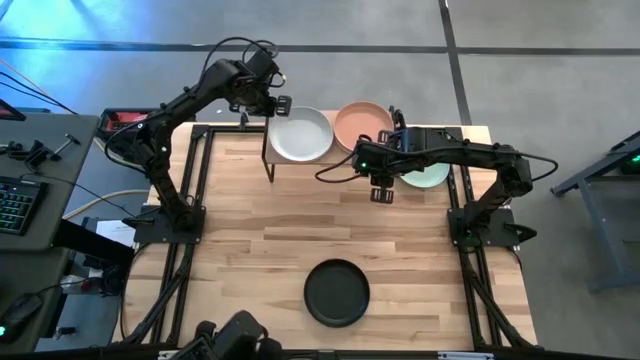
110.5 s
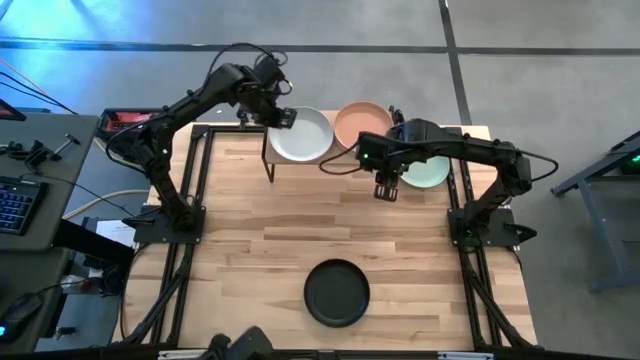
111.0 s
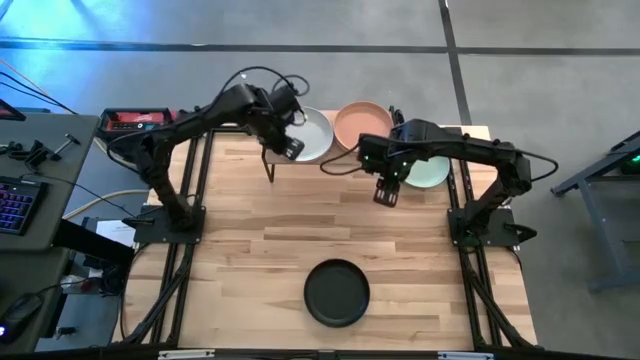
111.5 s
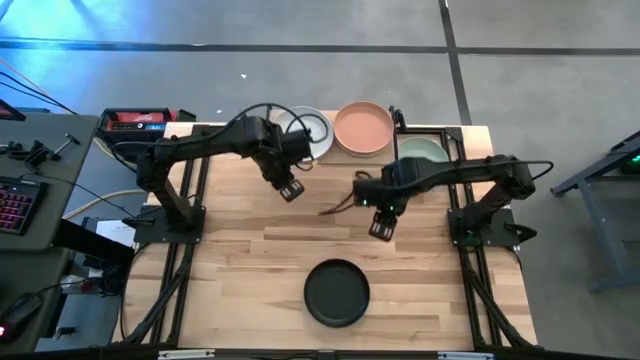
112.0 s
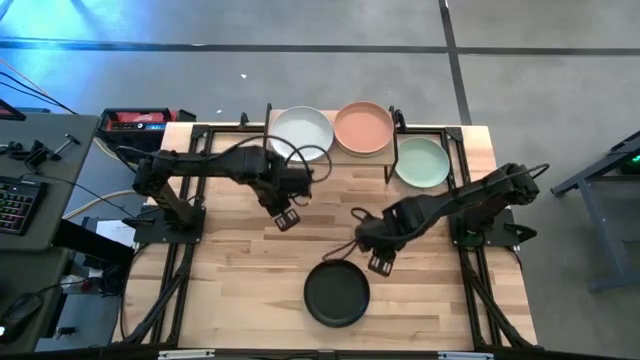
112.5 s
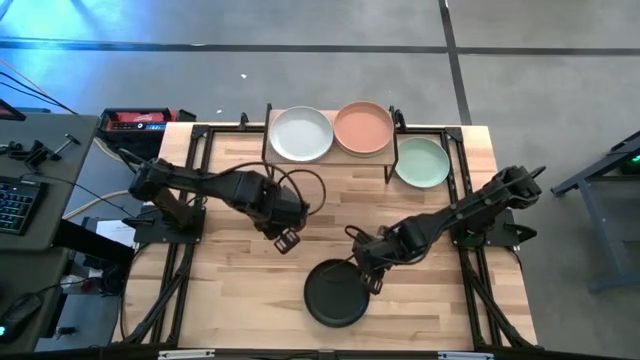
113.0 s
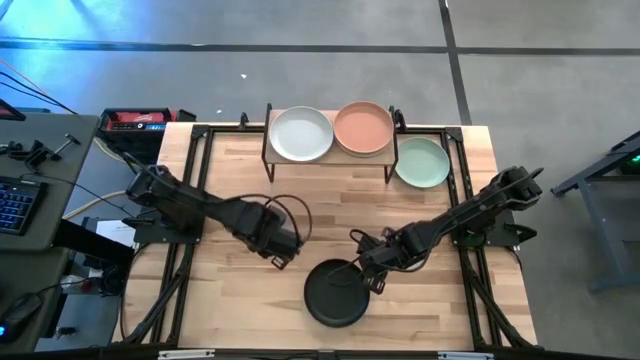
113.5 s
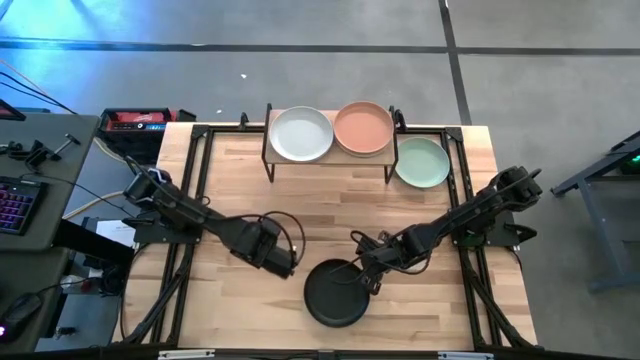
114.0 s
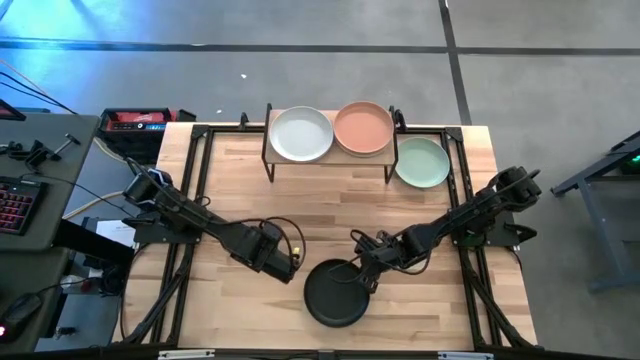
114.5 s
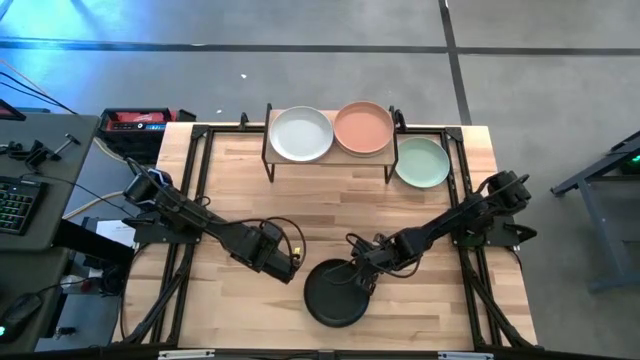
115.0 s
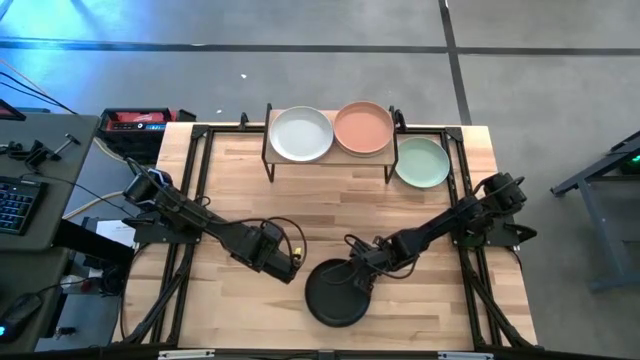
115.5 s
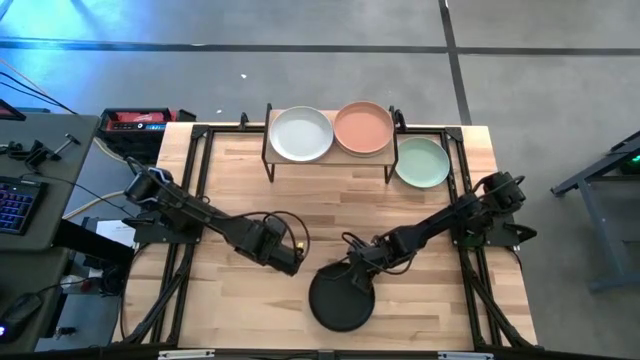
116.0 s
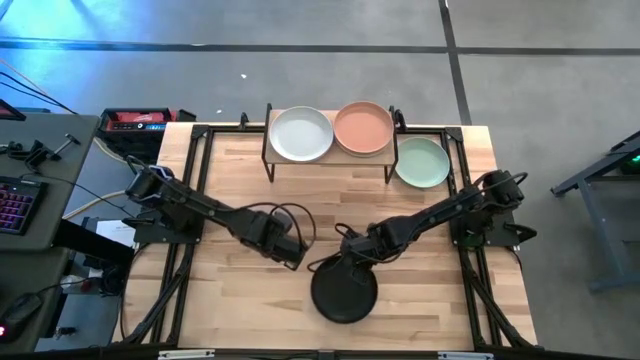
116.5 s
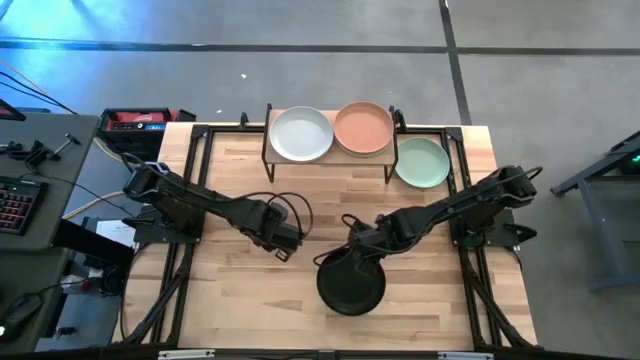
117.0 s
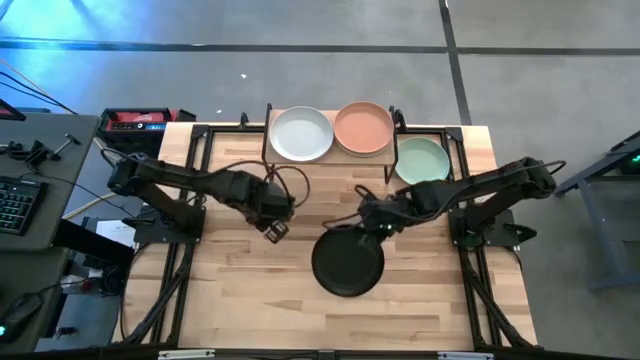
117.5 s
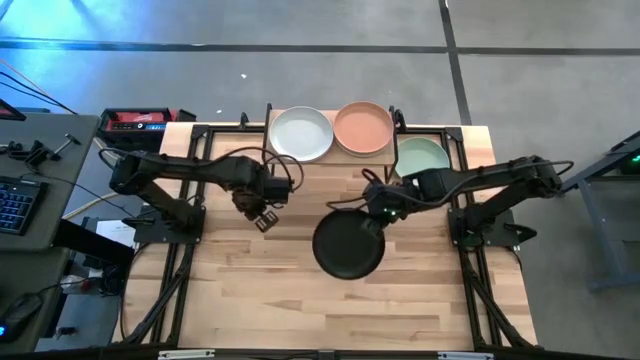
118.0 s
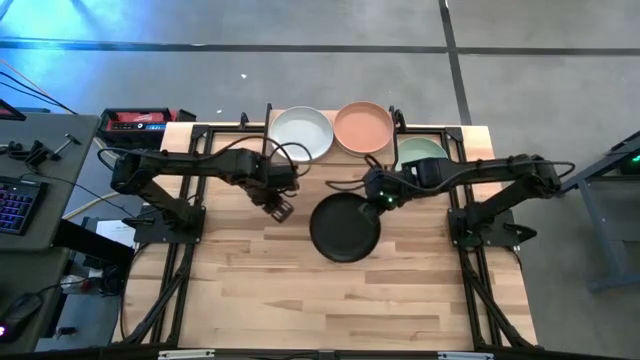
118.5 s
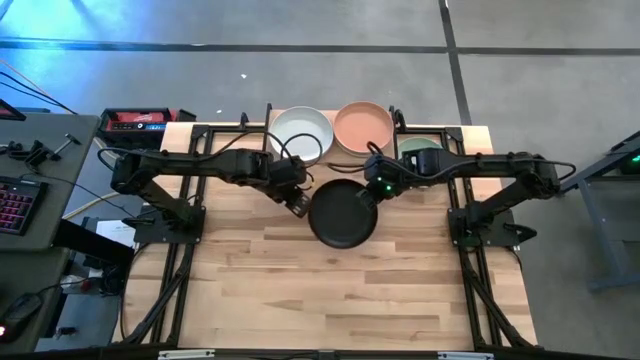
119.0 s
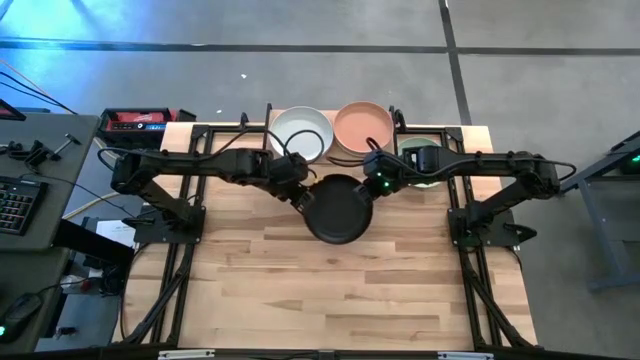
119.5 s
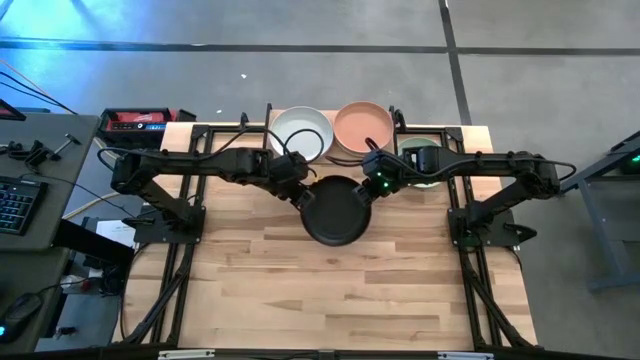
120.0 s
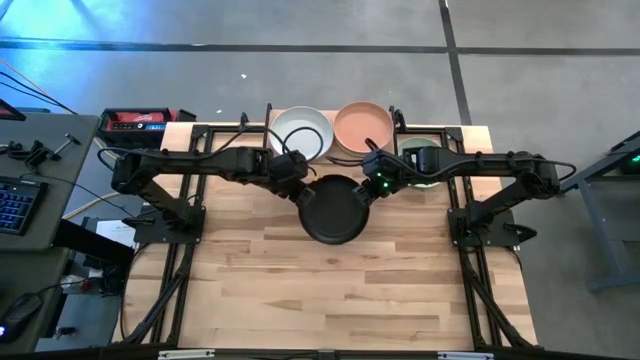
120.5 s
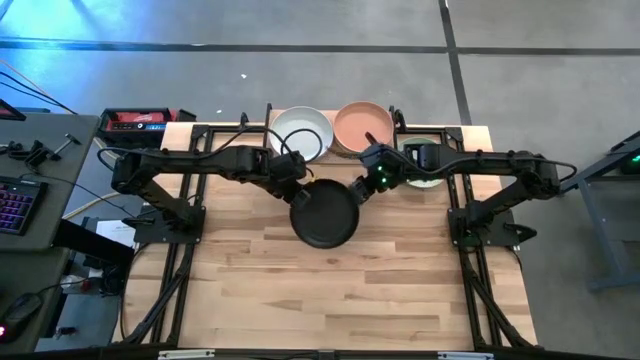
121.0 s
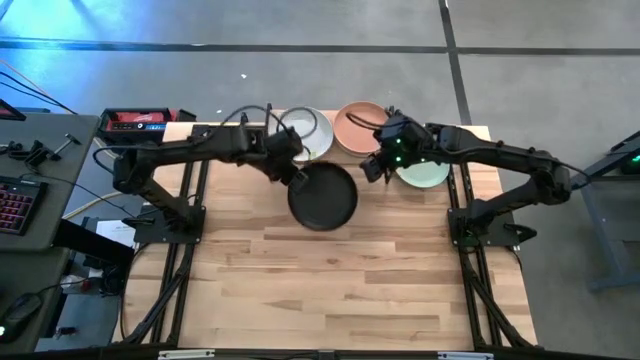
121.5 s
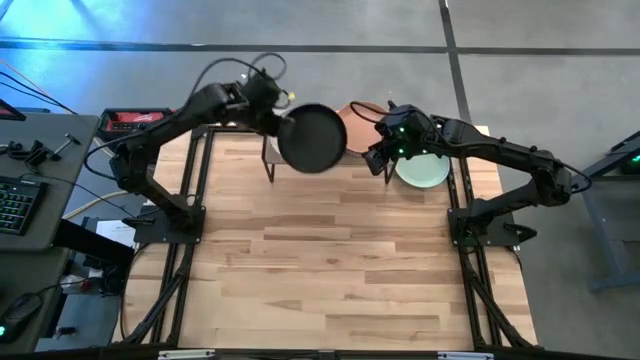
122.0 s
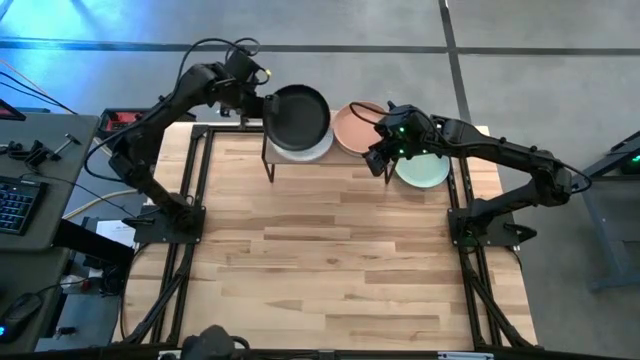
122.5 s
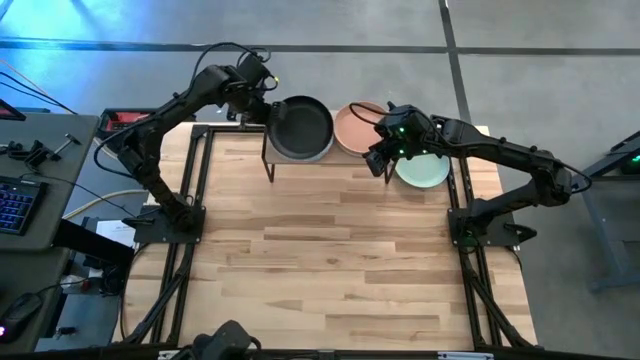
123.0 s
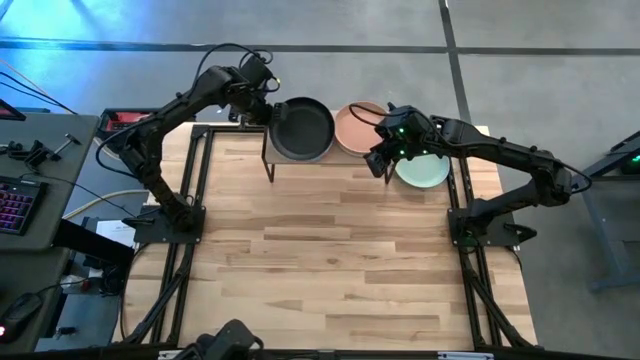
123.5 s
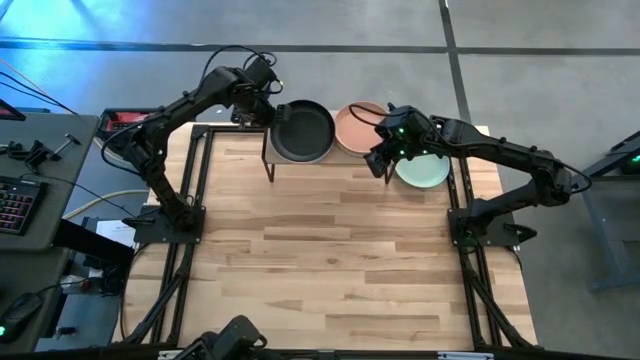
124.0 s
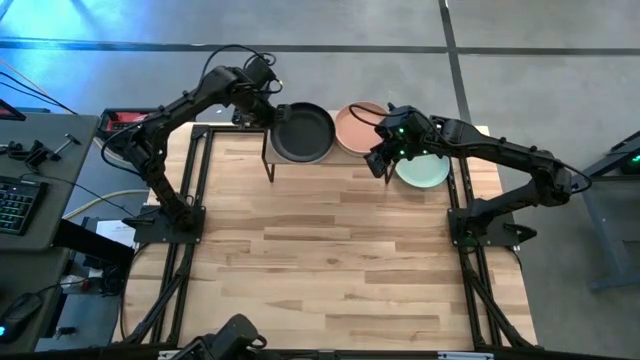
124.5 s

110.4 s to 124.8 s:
Task: Place and stack plates onto a shelf
Stack the black plate on top of the other gray plate on the shelf

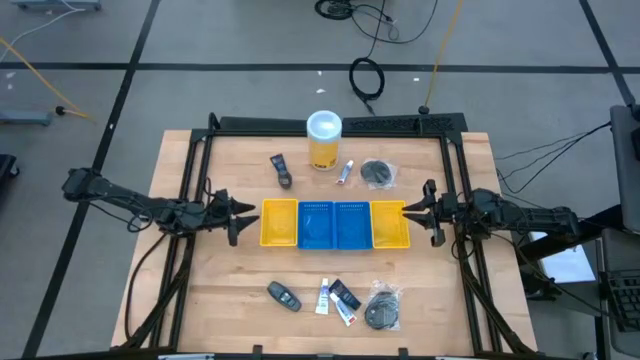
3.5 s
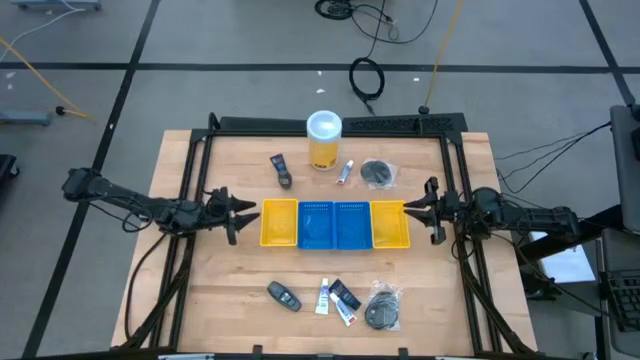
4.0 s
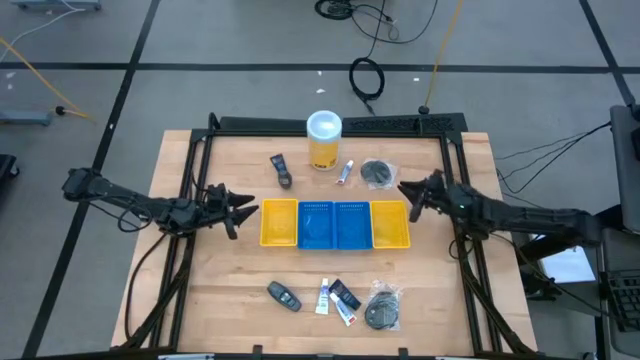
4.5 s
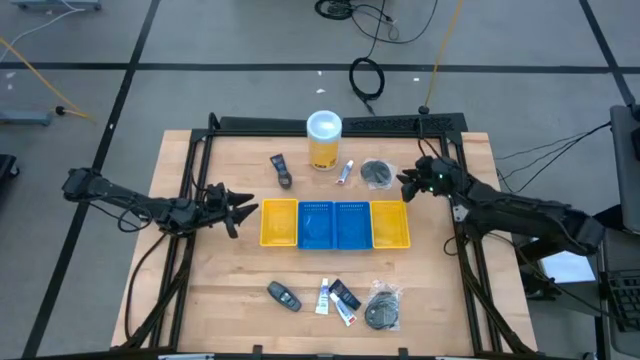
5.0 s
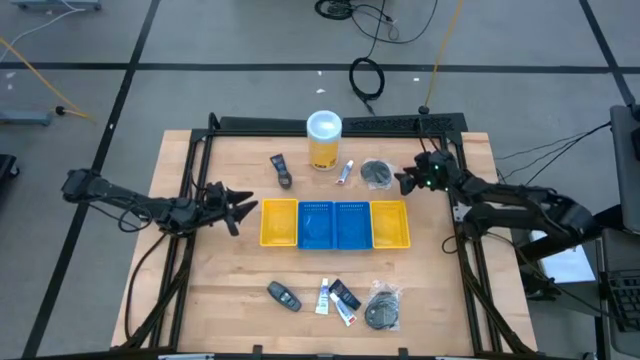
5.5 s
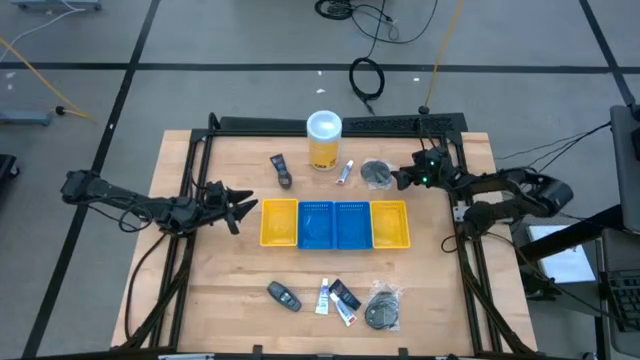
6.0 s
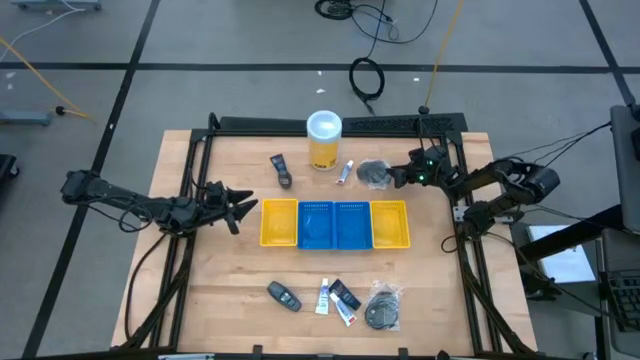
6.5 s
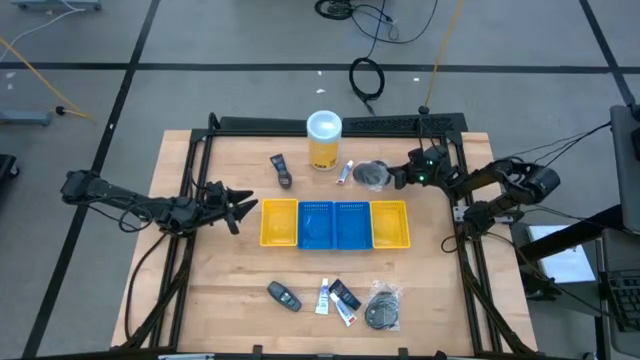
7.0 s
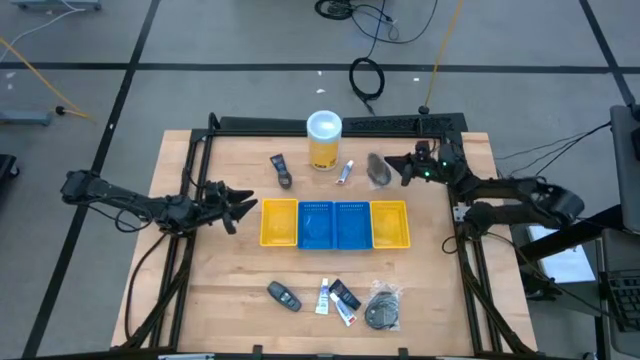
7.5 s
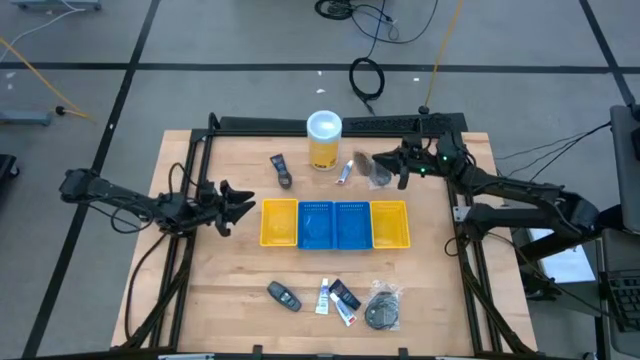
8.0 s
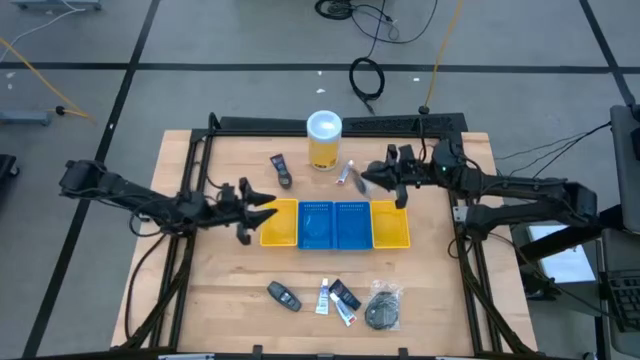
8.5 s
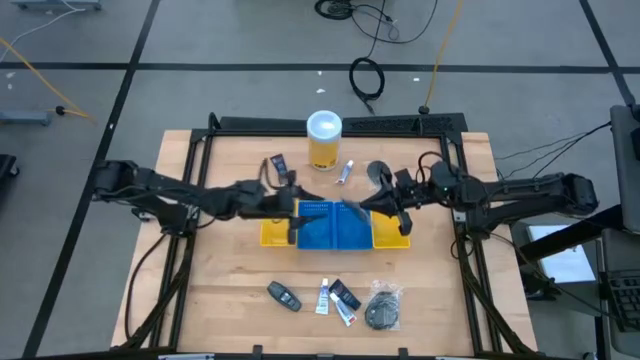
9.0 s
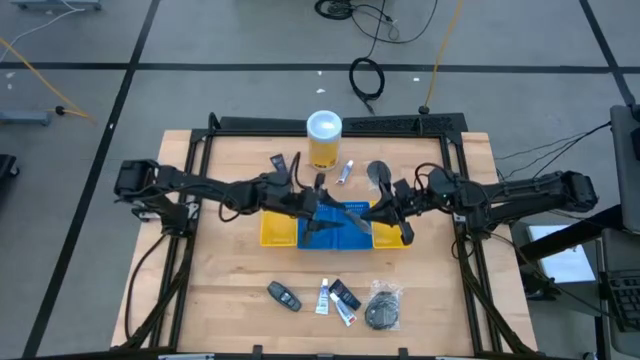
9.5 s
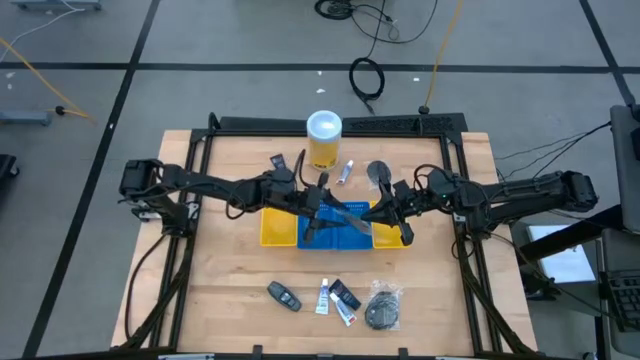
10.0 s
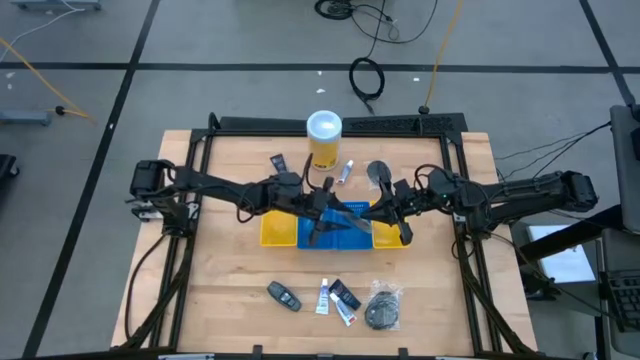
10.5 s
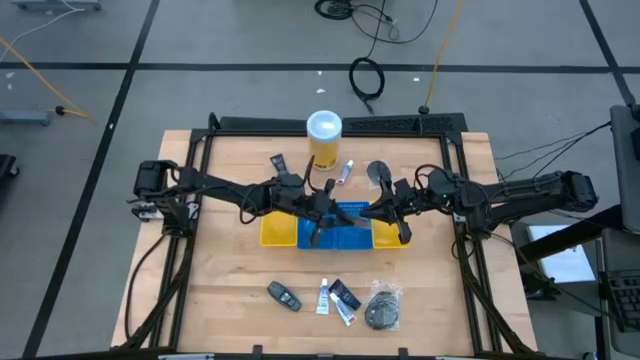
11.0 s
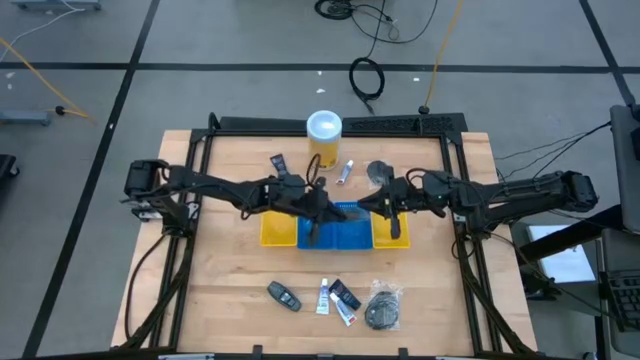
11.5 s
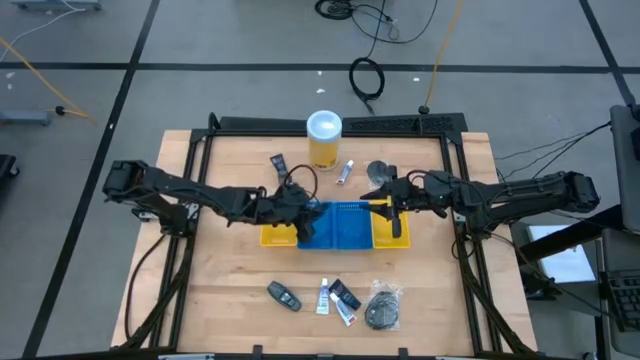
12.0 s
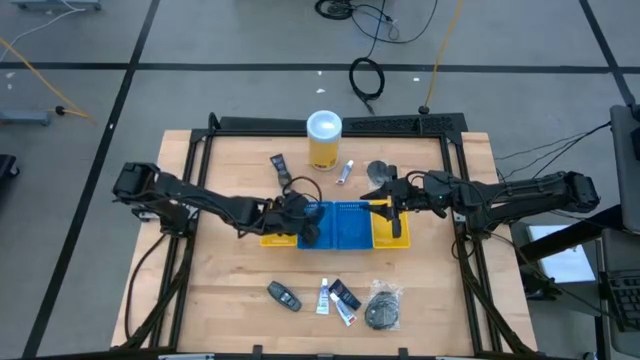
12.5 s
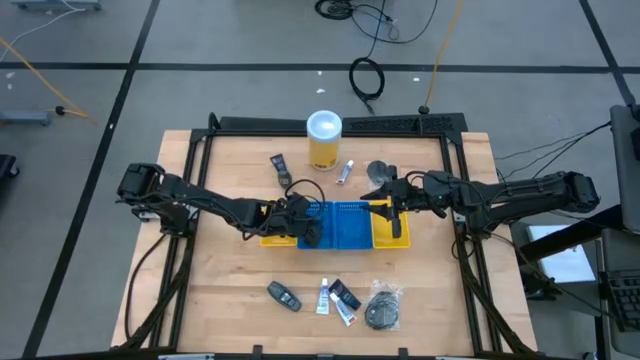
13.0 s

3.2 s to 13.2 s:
Task: Pick & Place Travel size toiletries
Put the black comb into the left blue bin
